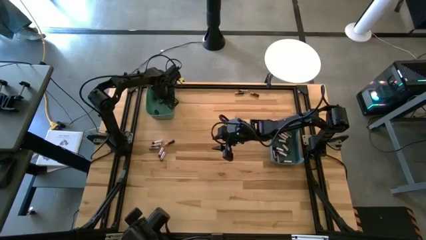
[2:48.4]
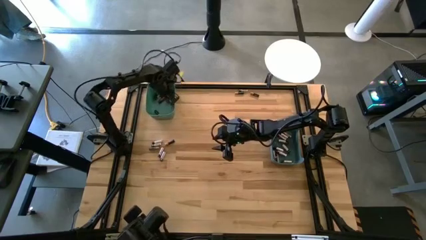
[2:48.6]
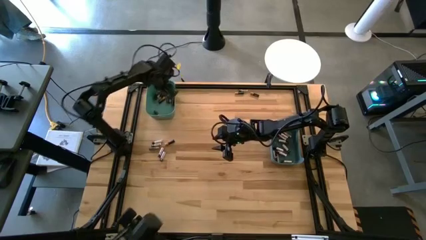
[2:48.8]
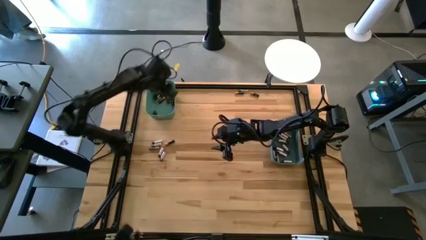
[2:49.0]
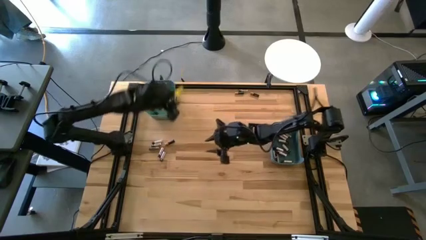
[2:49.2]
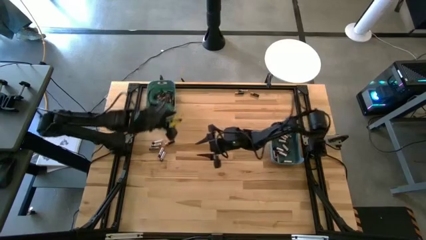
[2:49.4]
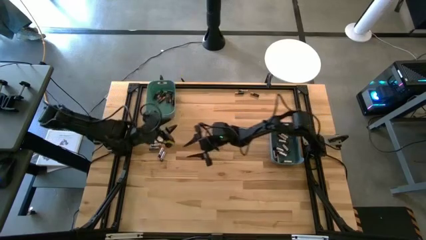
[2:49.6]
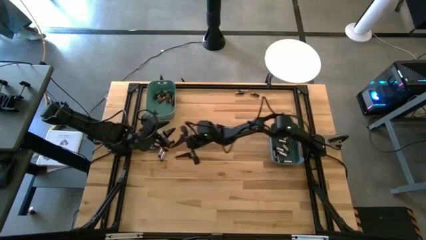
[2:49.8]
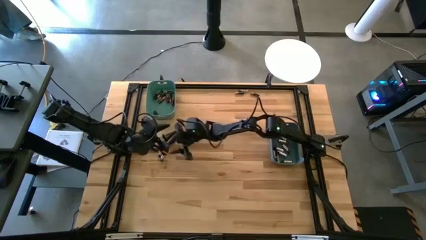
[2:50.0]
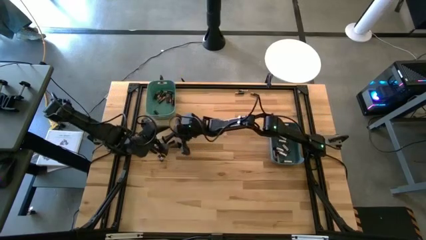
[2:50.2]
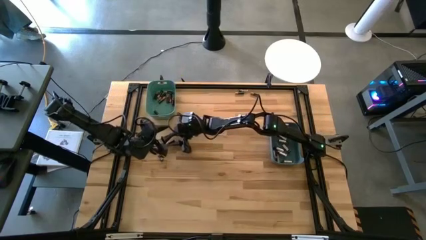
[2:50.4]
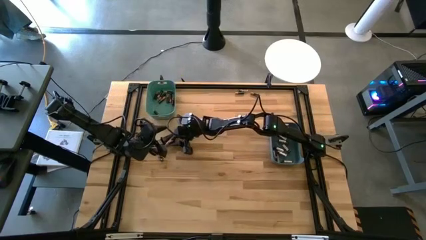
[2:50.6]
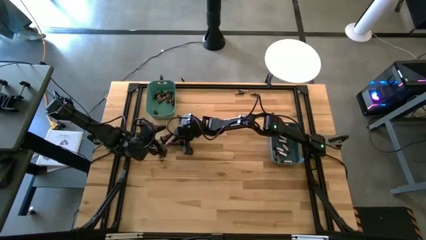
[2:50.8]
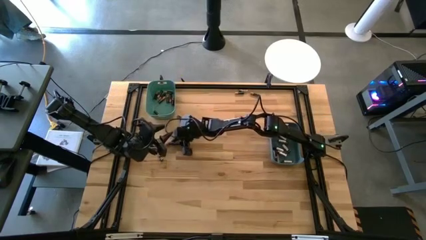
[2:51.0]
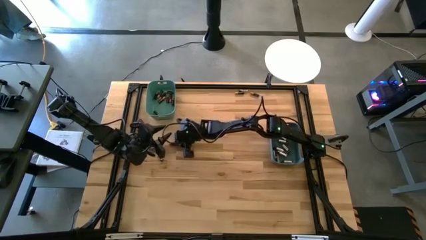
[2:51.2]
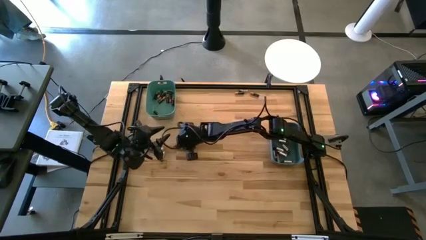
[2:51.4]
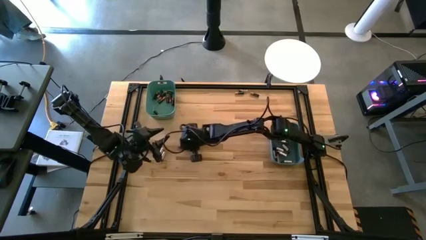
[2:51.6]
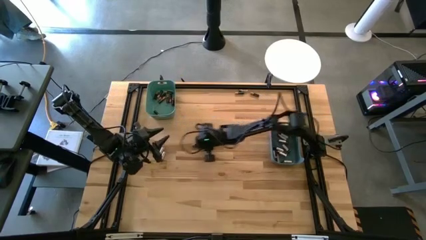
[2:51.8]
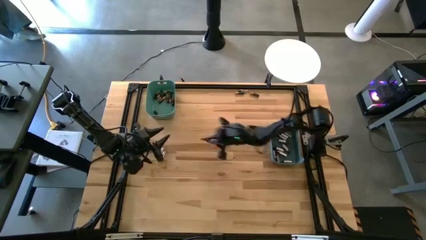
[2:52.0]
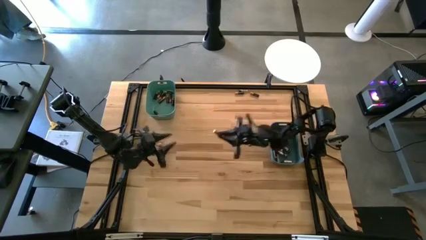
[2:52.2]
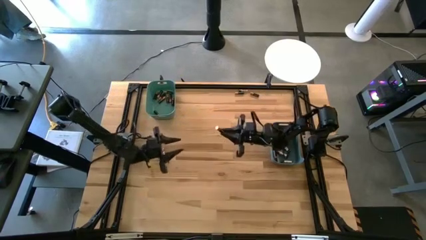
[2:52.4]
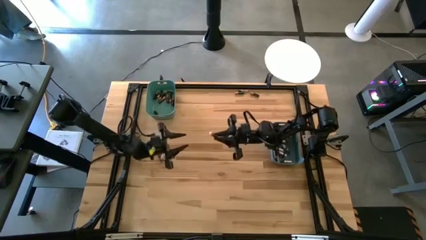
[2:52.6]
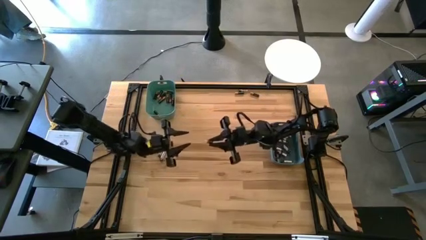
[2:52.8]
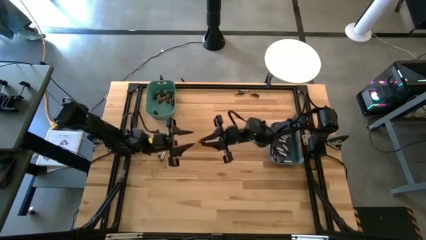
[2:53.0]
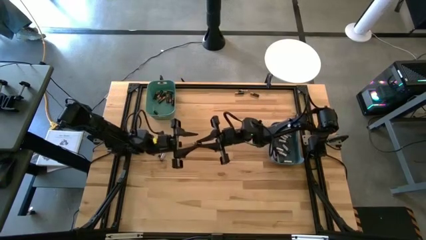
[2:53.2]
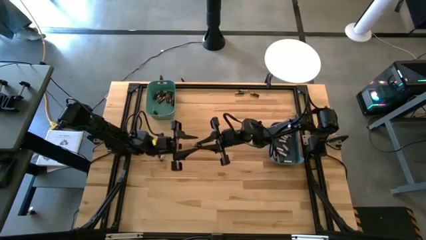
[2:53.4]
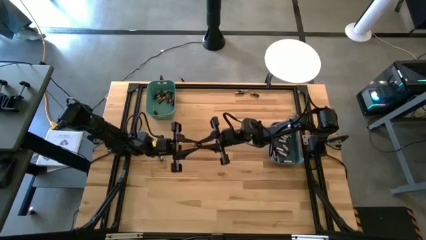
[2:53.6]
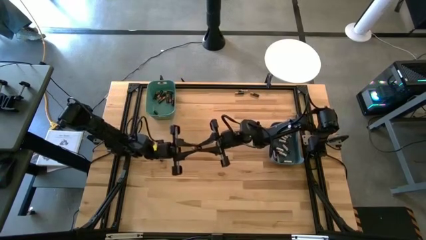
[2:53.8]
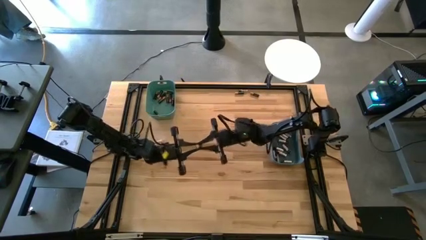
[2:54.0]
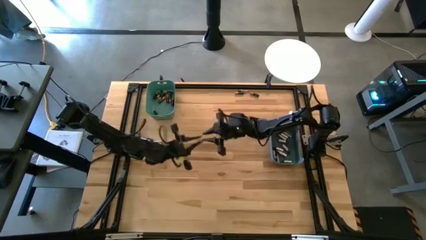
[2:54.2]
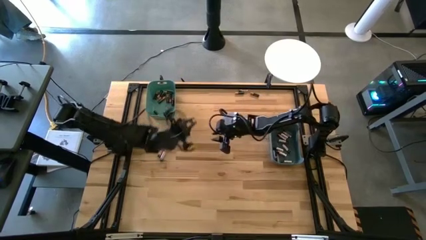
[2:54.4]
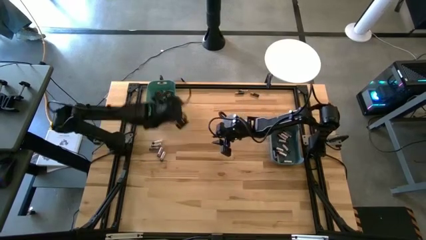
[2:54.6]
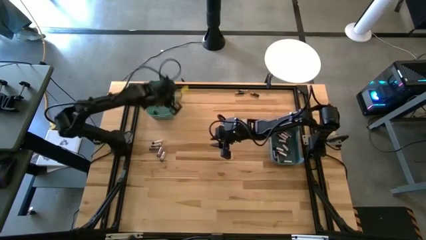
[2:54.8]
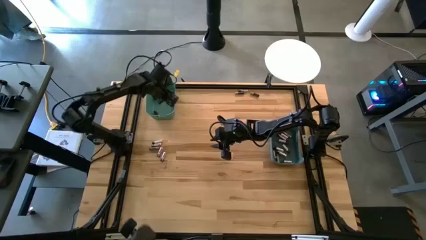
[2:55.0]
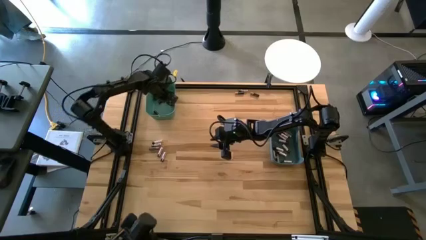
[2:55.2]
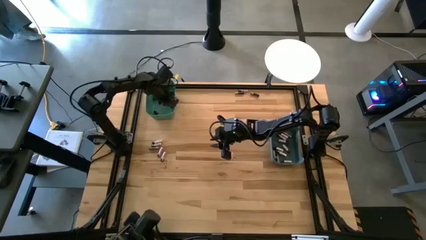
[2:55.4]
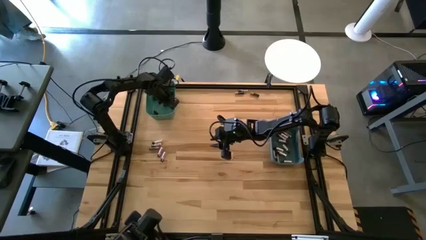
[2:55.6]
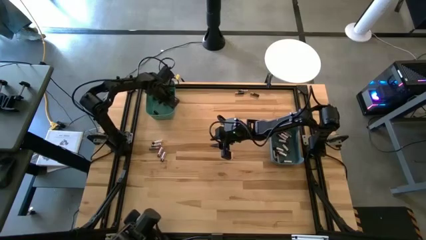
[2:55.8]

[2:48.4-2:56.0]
Task: Sort batteries
Put the black battery into the green bin

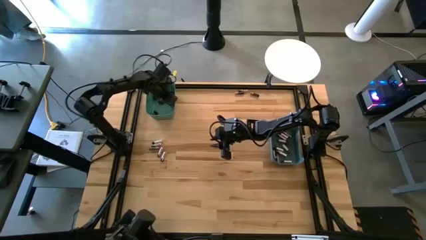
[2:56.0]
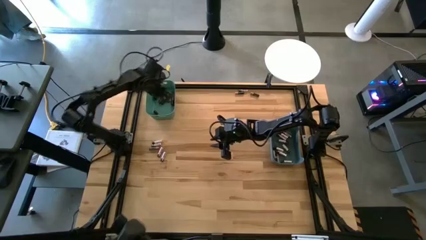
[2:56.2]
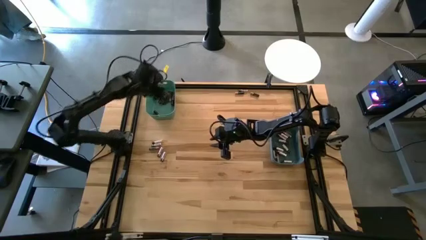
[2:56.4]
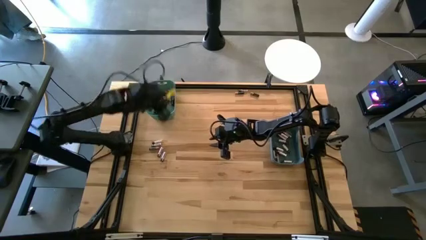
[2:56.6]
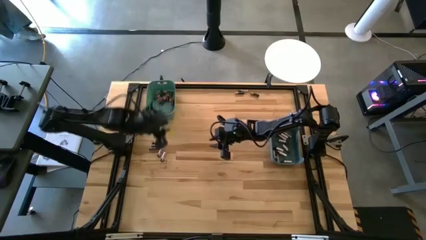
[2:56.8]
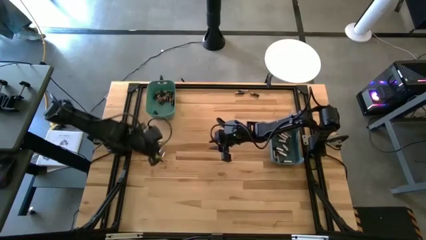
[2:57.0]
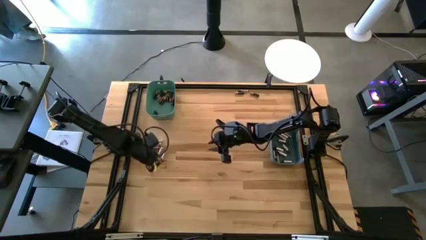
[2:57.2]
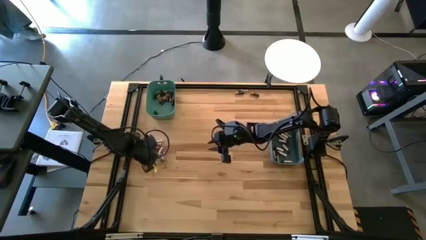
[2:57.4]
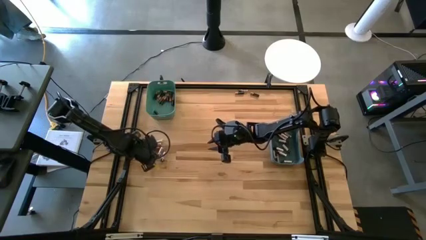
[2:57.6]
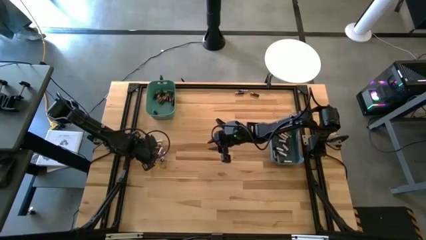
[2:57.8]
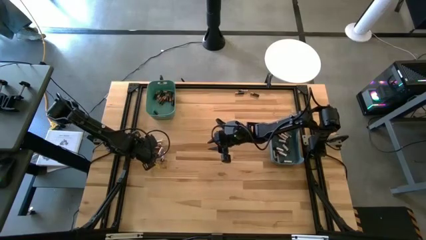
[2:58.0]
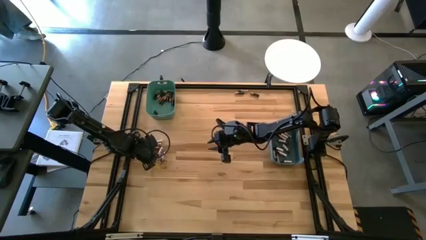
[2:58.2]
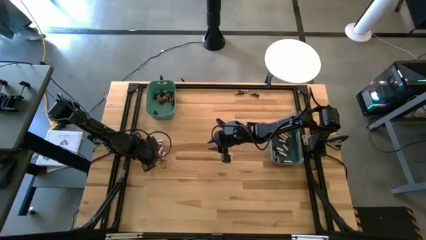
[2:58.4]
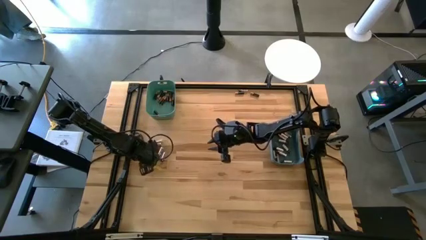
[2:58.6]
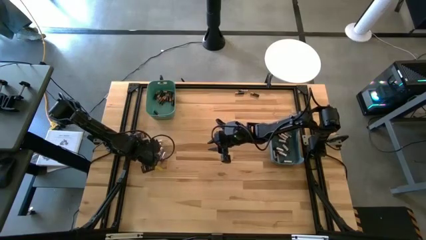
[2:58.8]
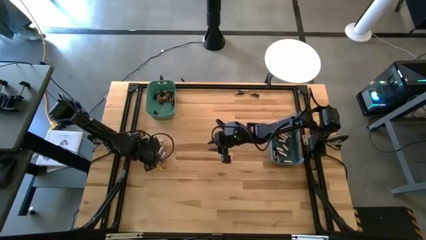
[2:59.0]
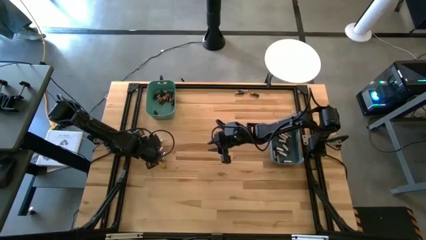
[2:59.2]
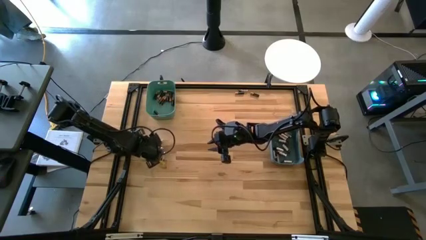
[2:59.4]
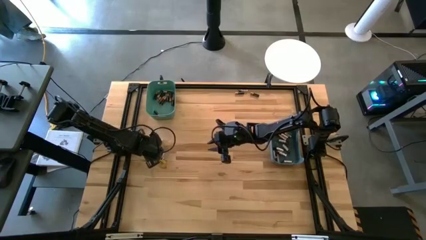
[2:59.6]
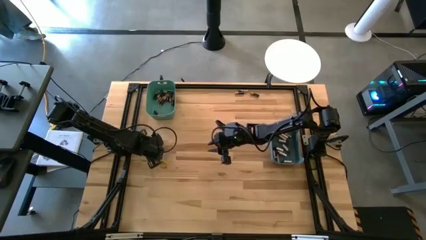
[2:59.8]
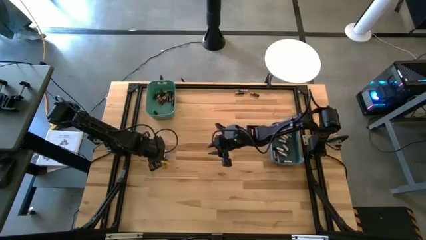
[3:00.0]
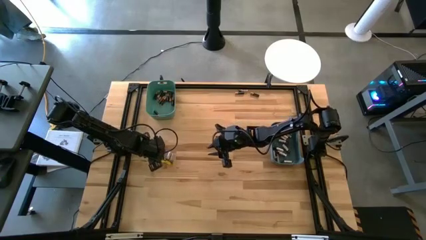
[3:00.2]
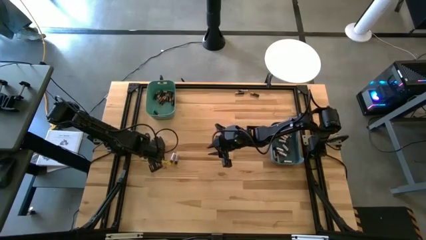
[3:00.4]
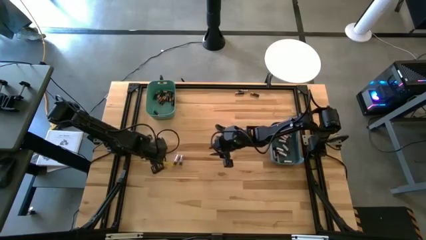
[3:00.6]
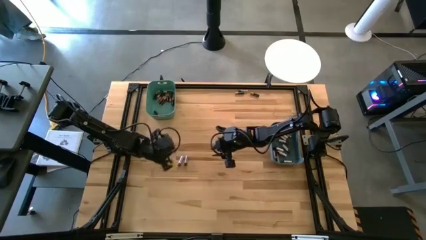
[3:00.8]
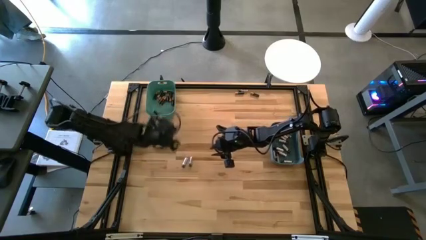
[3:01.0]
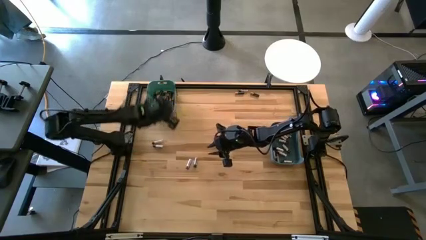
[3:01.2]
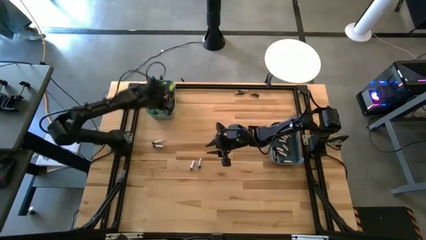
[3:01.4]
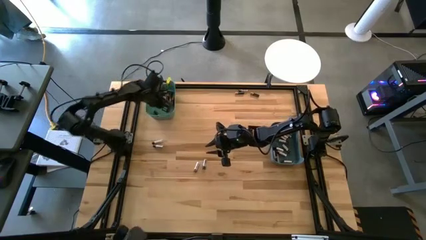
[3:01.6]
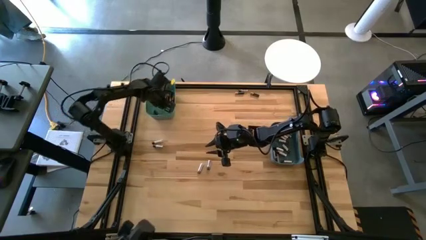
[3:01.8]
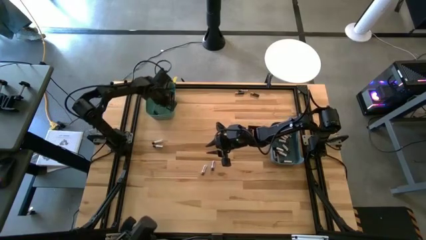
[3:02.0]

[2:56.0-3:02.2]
Put the black battery into the green bin

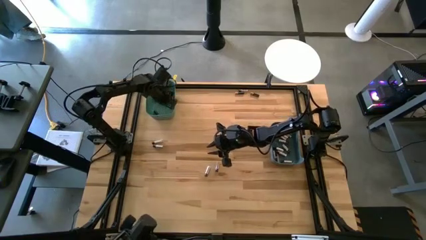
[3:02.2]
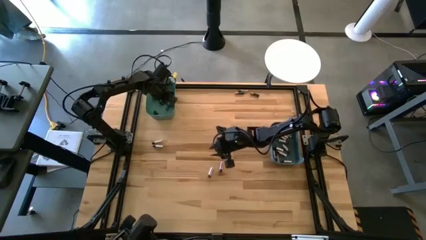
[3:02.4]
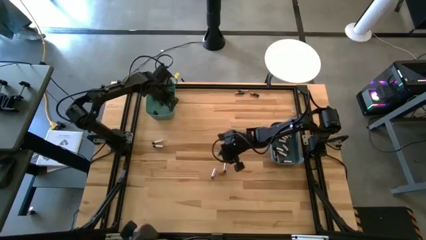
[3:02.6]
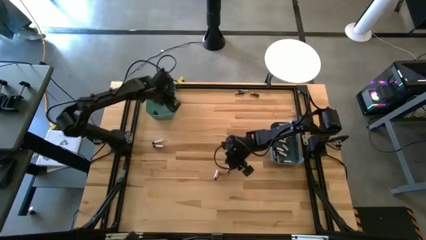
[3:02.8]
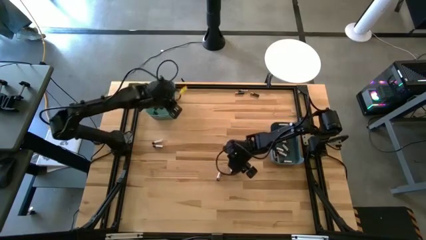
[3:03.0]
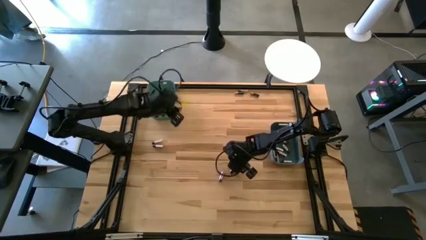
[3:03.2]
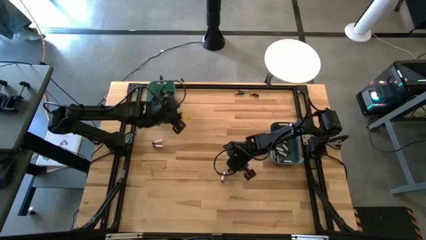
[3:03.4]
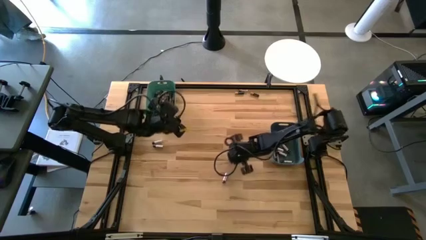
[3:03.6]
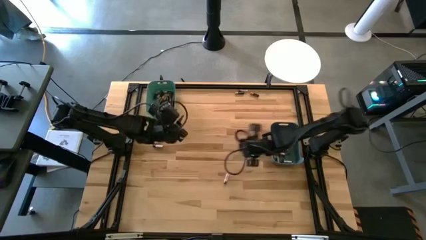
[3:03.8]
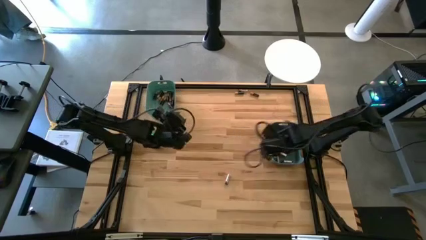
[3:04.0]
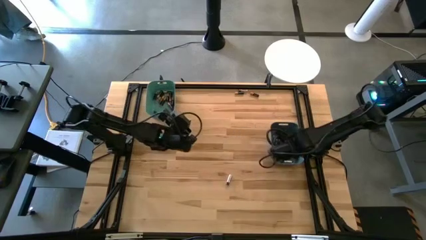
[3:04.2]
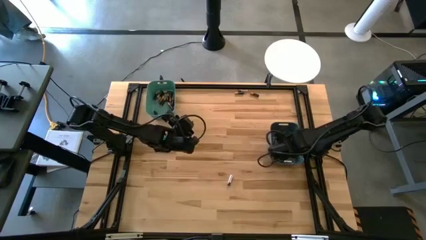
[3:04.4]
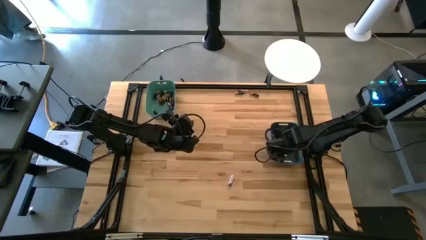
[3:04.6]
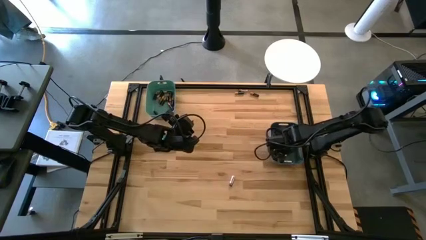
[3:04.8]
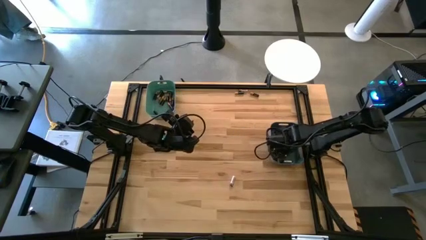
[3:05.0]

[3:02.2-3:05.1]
Put the silver battery into the blue bin
